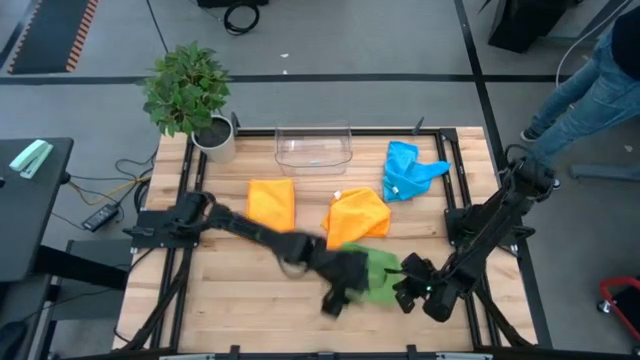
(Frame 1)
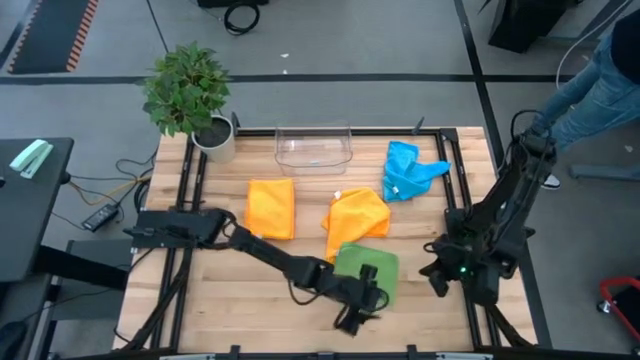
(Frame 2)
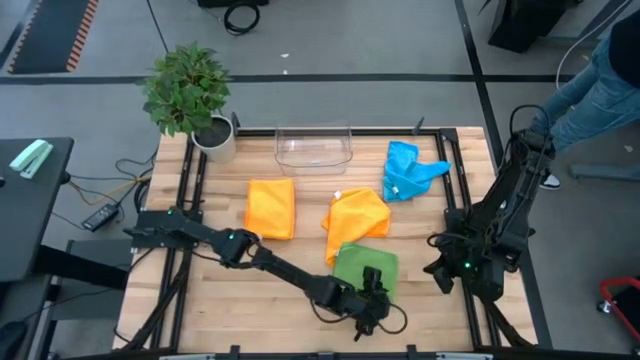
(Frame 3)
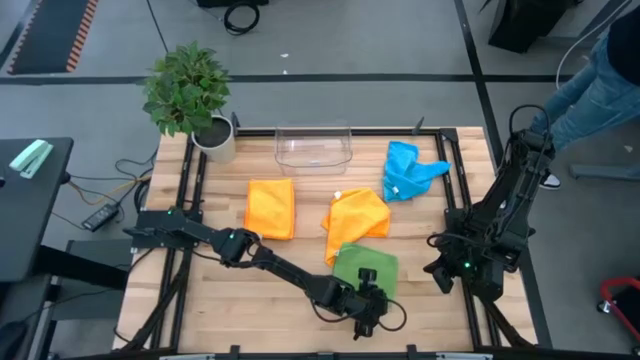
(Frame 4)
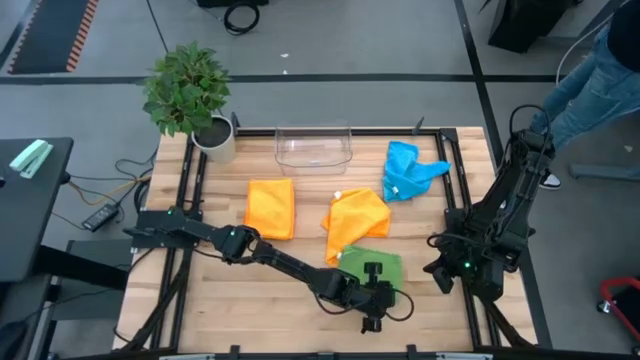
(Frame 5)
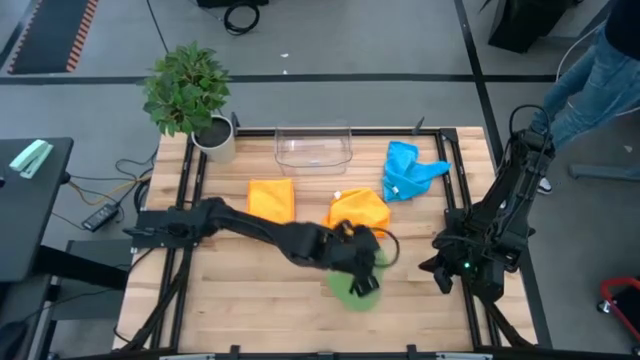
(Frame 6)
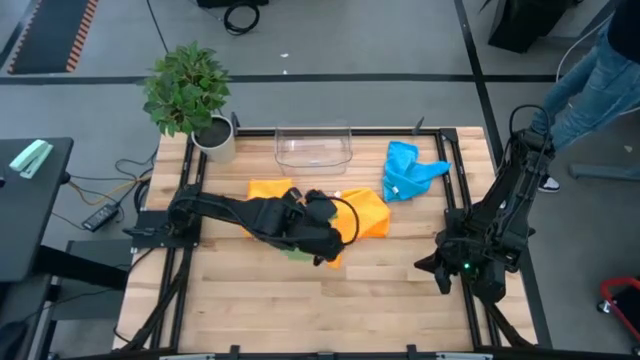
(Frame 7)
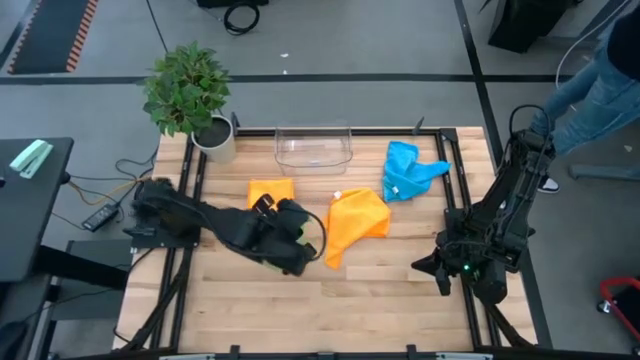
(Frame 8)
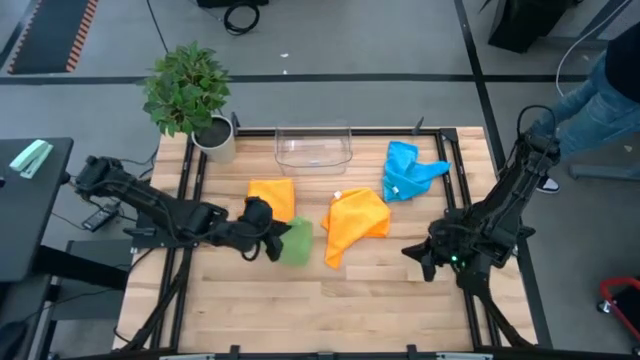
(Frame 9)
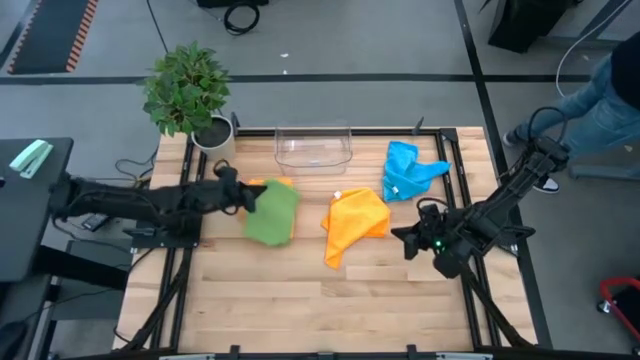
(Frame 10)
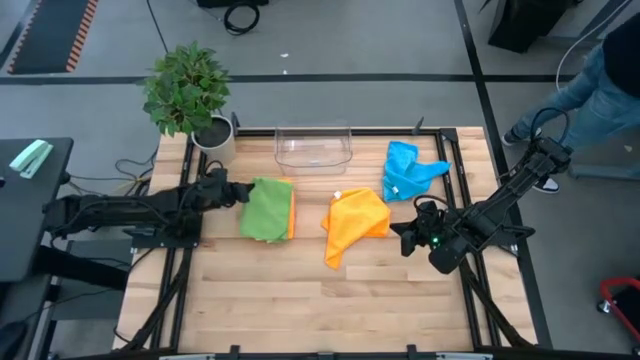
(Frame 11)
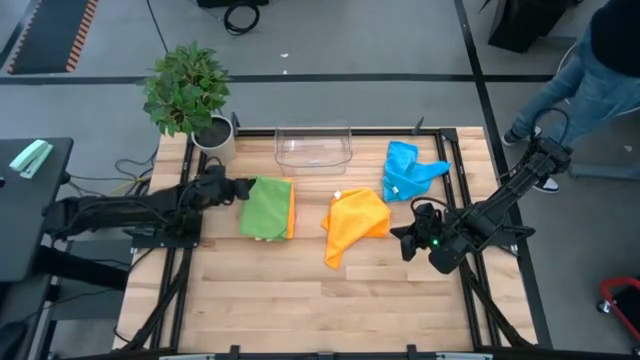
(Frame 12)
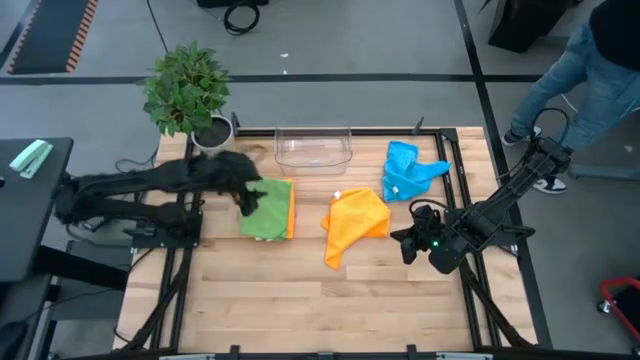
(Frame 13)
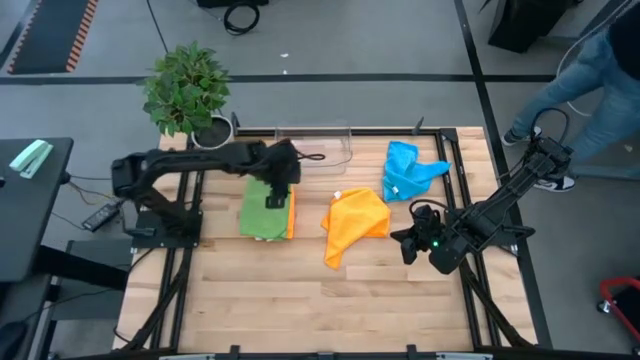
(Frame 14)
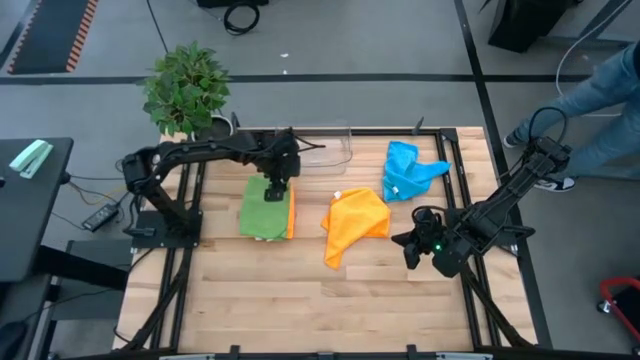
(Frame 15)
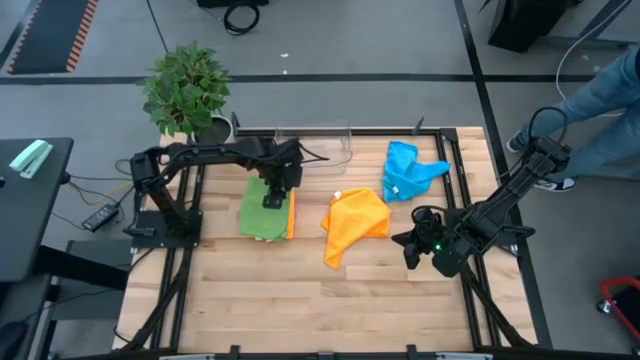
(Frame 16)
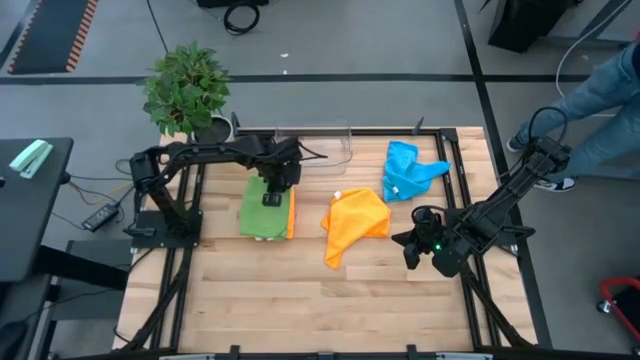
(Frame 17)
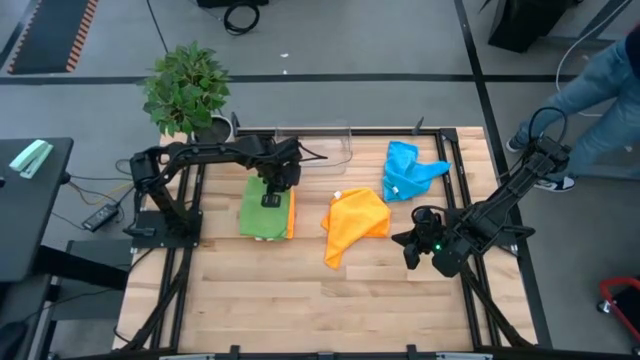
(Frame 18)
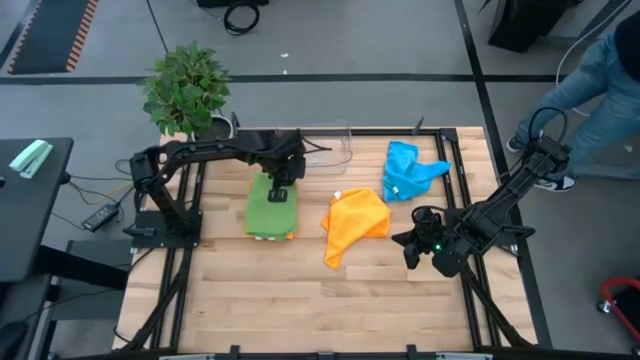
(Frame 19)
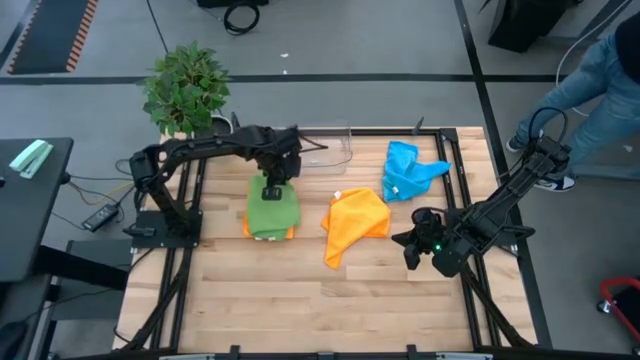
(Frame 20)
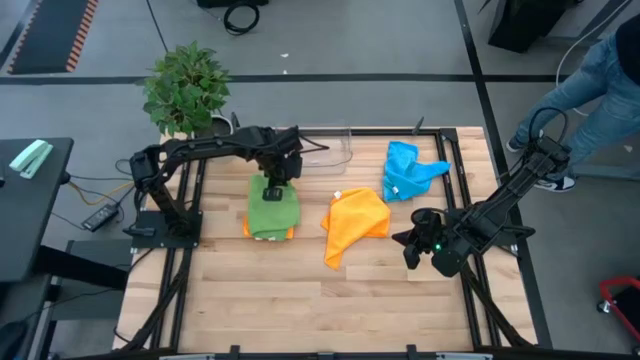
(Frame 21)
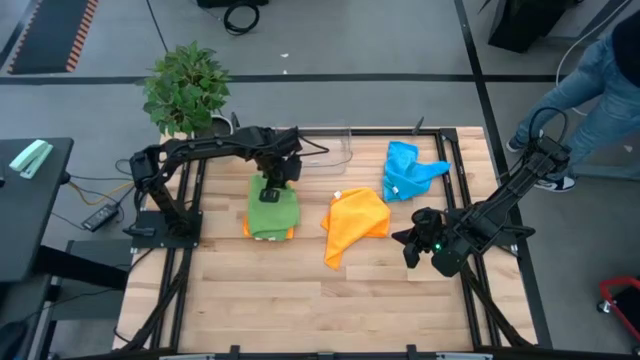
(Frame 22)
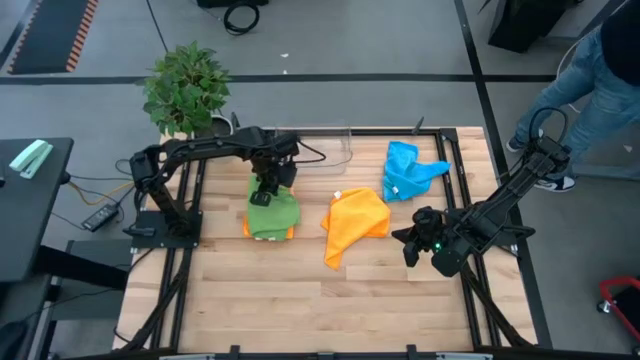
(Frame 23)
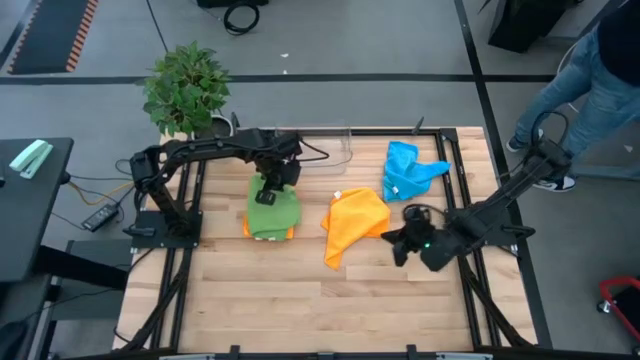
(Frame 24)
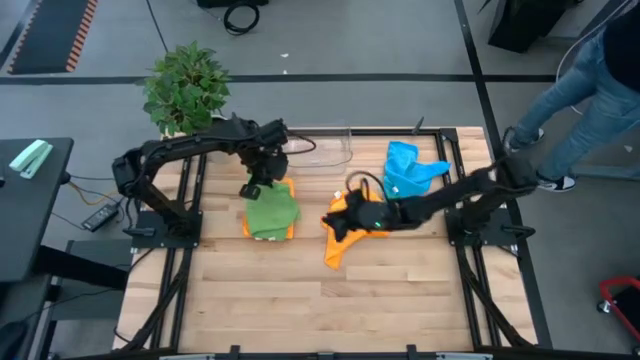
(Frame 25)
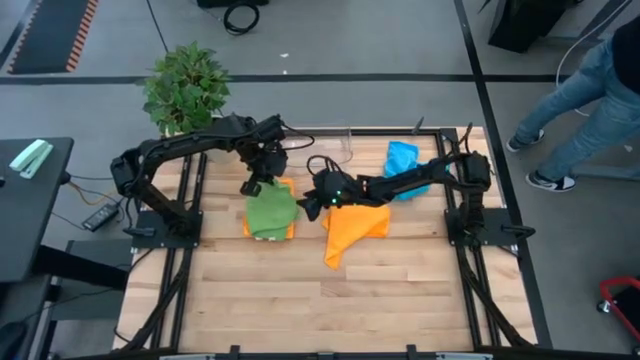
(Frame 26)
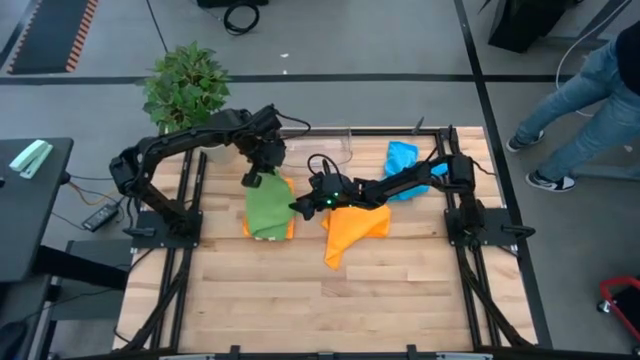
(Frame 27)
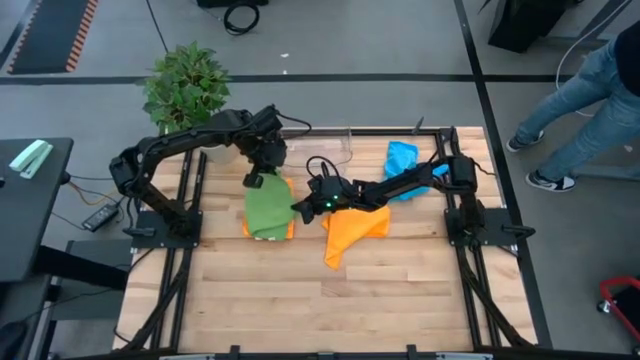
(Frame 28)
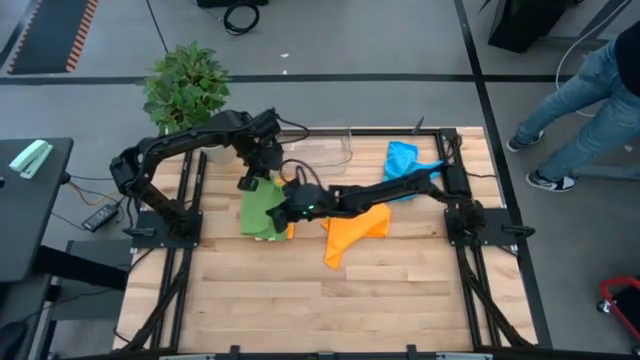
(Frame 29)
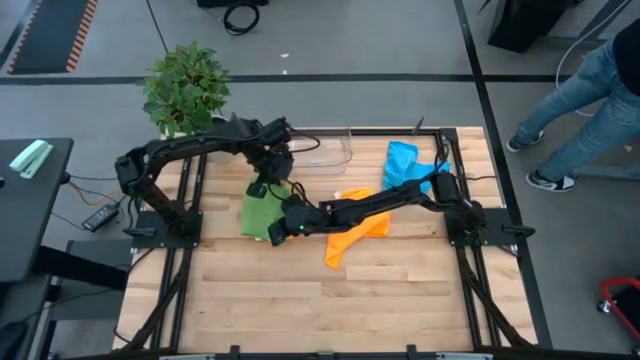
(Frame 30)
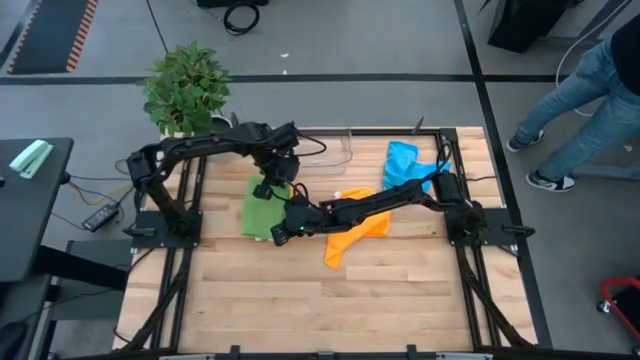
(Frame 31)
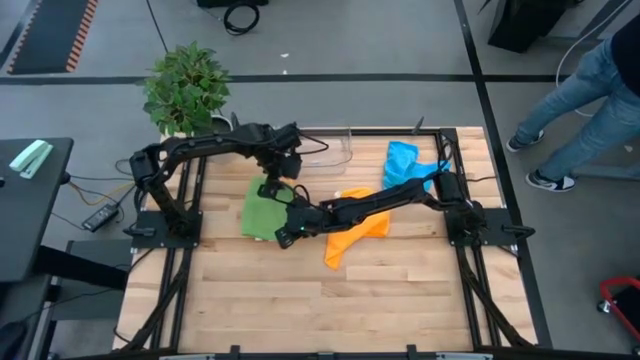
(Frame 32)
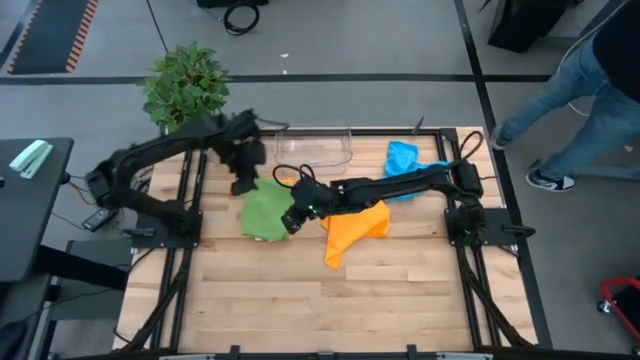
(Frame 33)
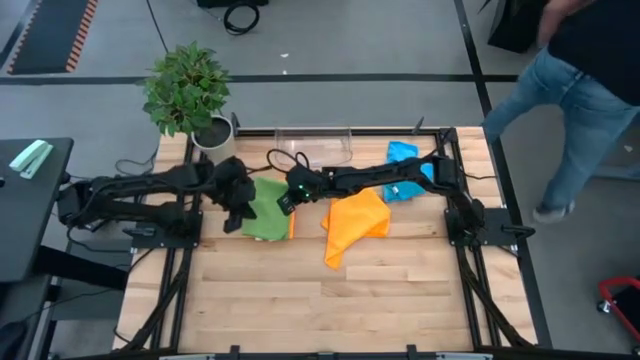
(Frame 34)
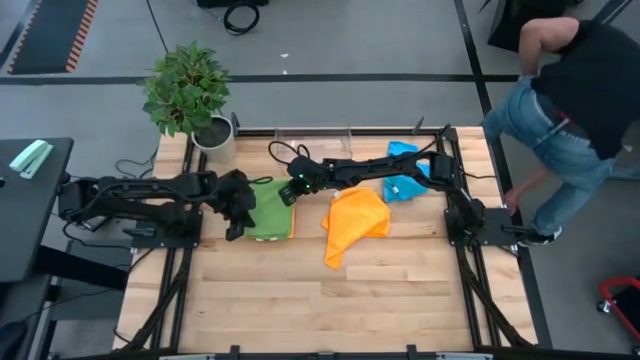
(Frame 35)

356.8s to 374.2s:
Task: Fold microfiber towels
Stack the folded green microfiber cloth on top of the folded orange microfiber cloth

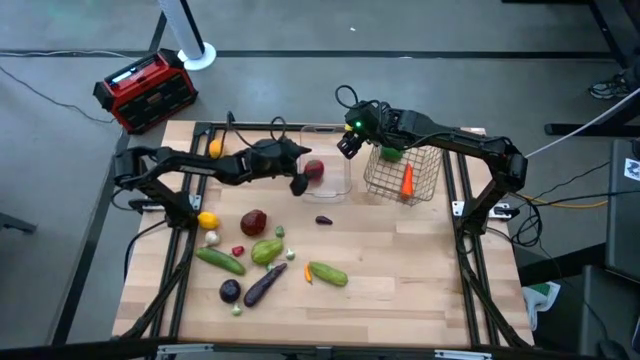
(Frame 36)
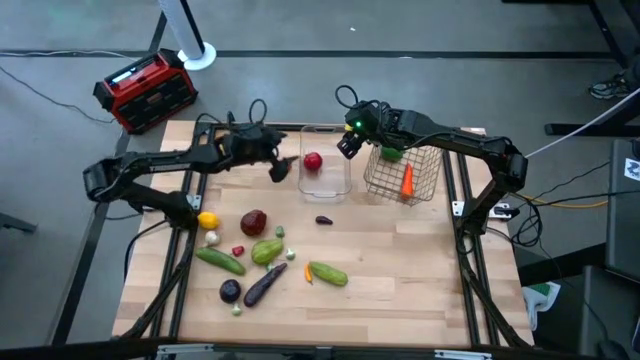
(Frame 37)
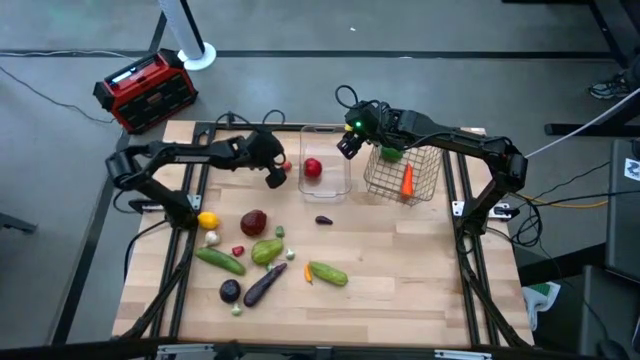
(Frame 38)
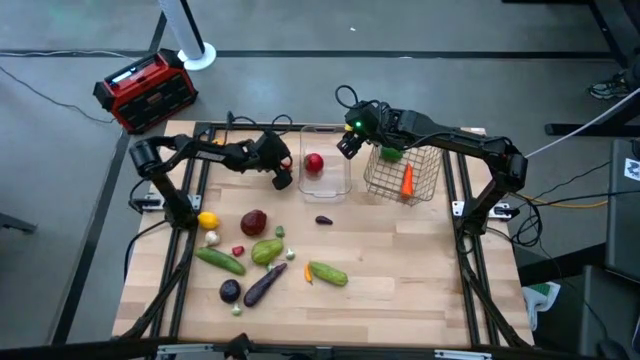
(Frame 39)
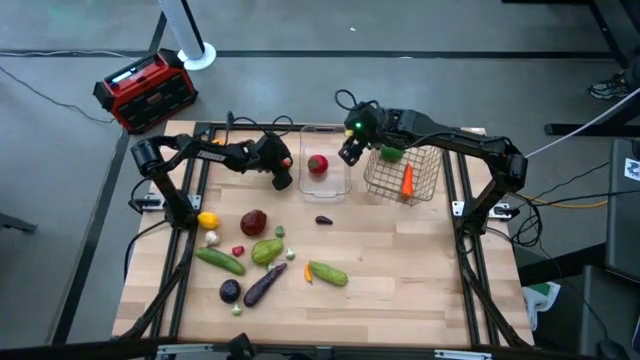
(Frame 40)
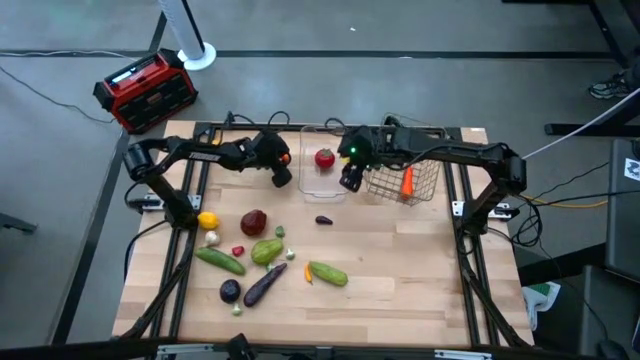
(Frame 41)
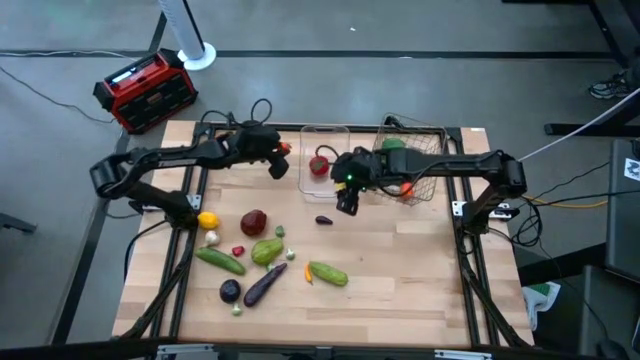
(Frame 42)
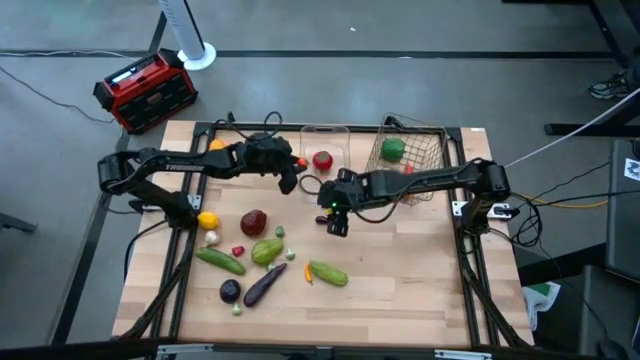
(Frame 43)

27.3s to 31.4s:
Task: Sort produce into baskets
Put the orange persimmon into the transparent bin
